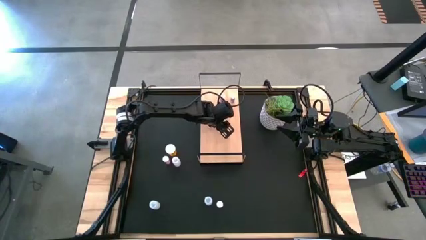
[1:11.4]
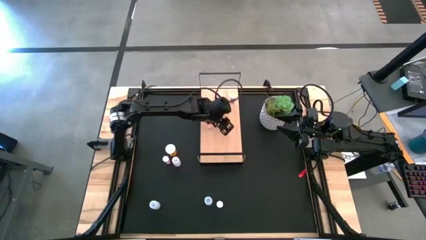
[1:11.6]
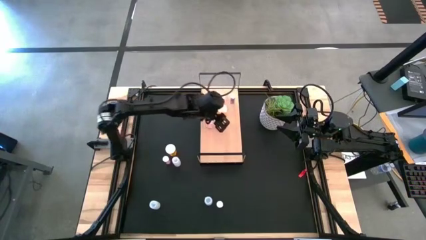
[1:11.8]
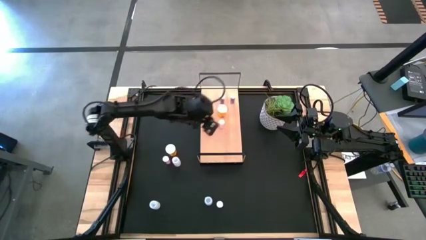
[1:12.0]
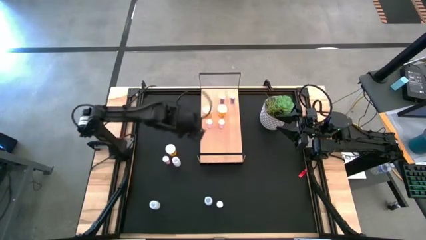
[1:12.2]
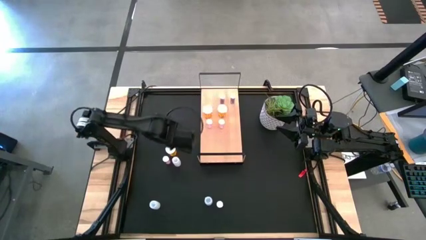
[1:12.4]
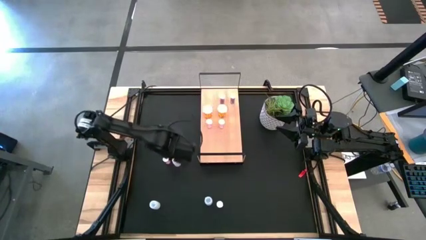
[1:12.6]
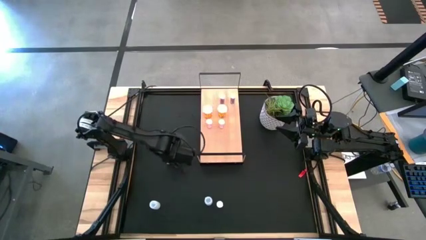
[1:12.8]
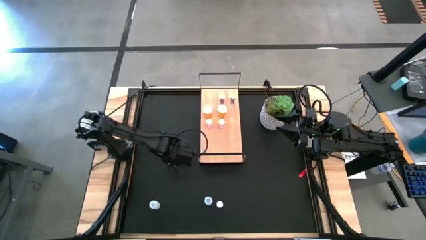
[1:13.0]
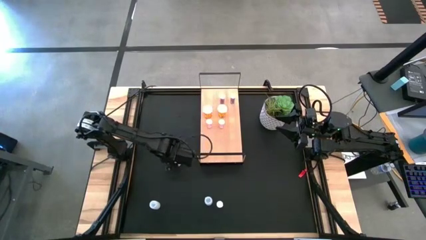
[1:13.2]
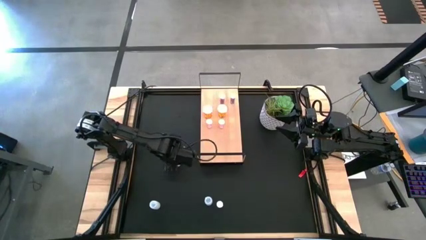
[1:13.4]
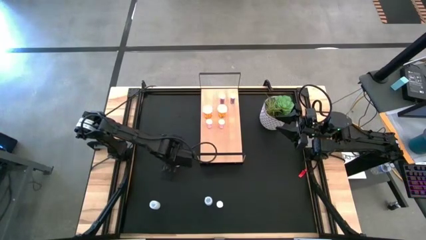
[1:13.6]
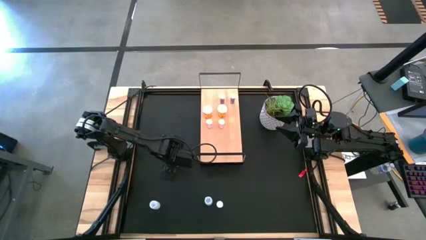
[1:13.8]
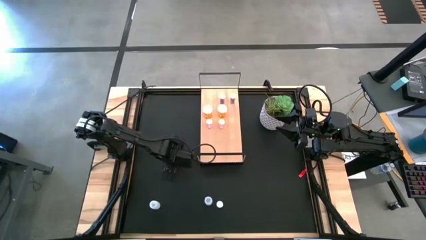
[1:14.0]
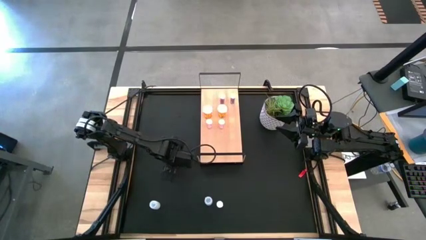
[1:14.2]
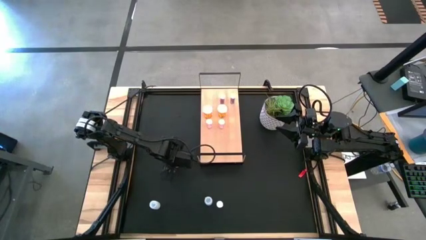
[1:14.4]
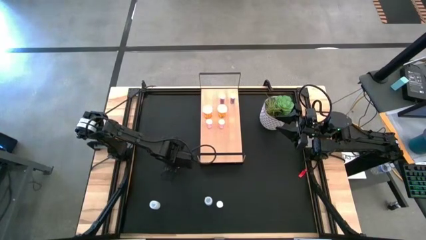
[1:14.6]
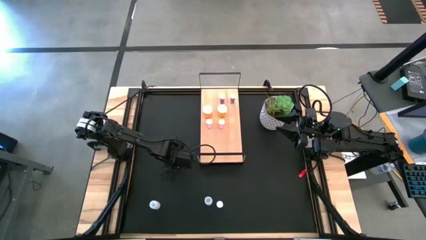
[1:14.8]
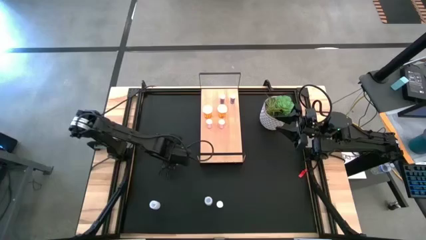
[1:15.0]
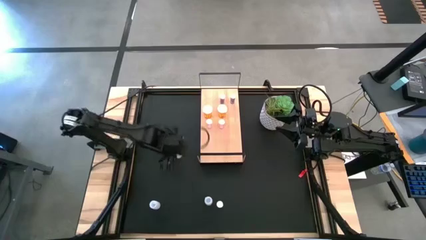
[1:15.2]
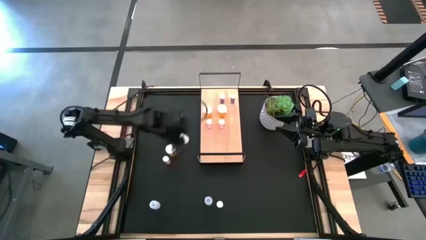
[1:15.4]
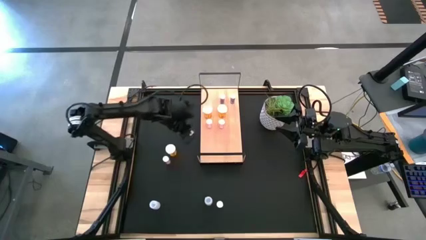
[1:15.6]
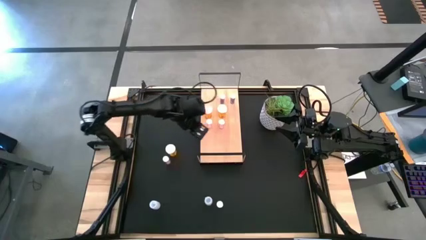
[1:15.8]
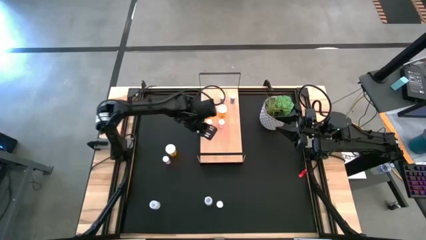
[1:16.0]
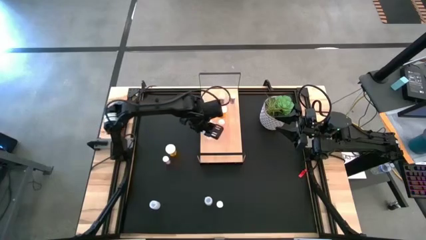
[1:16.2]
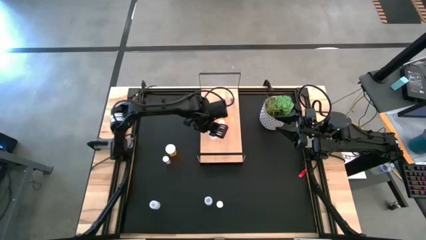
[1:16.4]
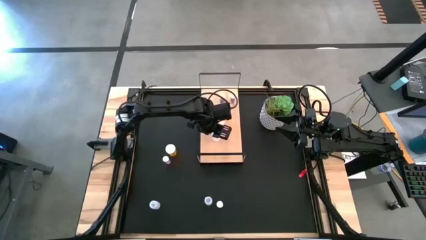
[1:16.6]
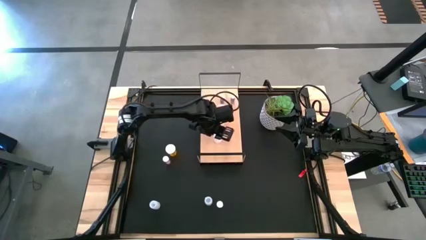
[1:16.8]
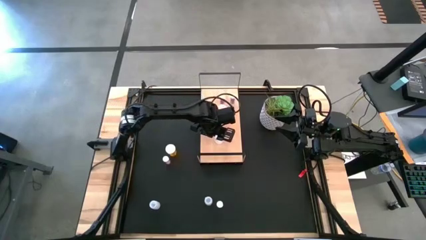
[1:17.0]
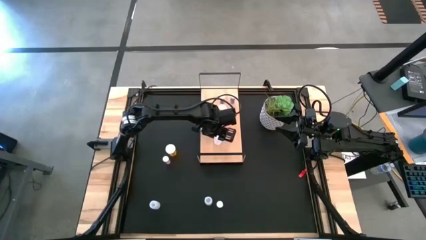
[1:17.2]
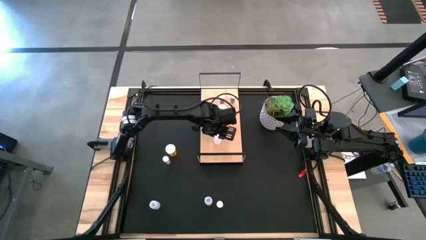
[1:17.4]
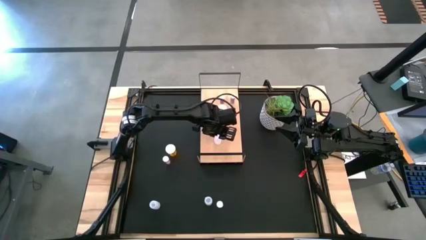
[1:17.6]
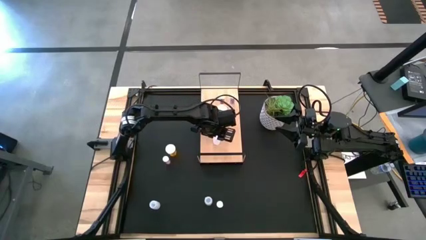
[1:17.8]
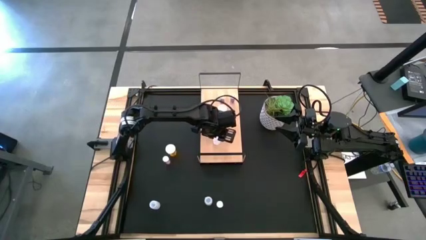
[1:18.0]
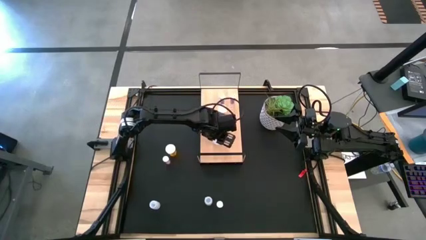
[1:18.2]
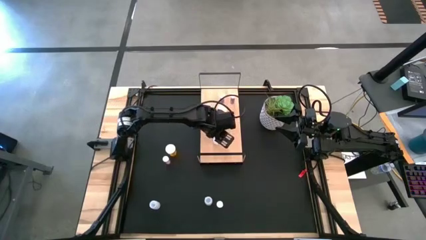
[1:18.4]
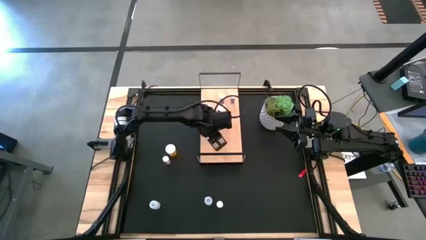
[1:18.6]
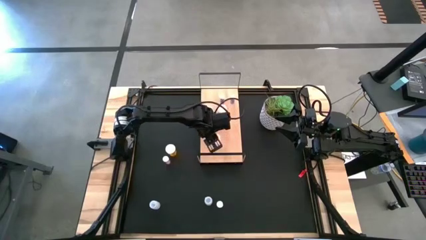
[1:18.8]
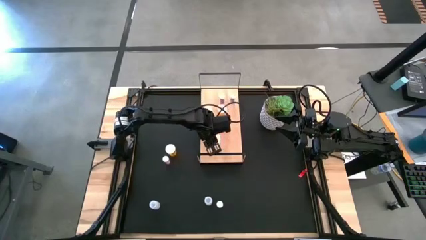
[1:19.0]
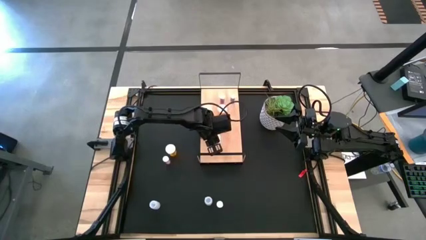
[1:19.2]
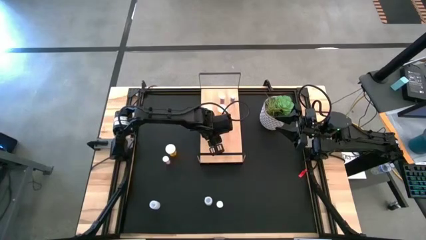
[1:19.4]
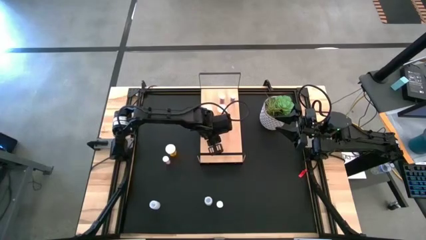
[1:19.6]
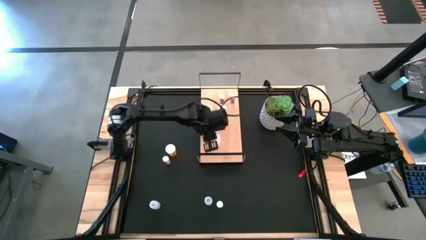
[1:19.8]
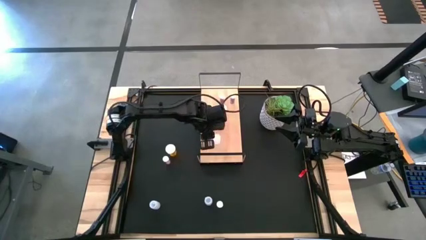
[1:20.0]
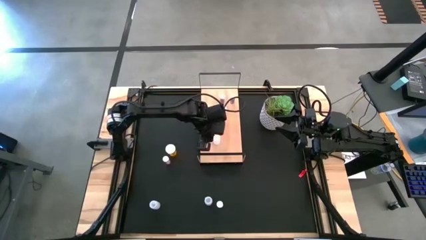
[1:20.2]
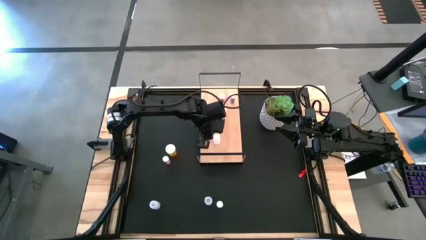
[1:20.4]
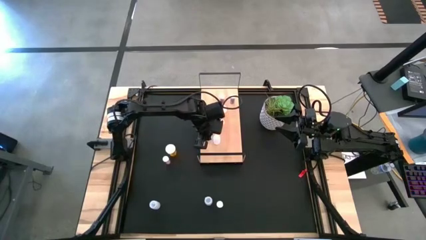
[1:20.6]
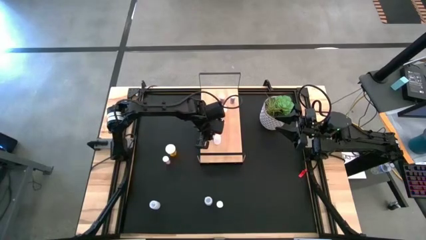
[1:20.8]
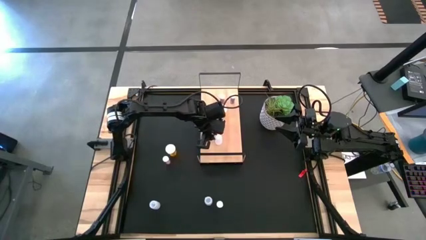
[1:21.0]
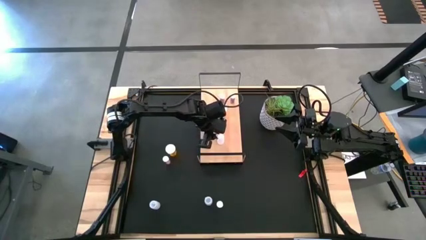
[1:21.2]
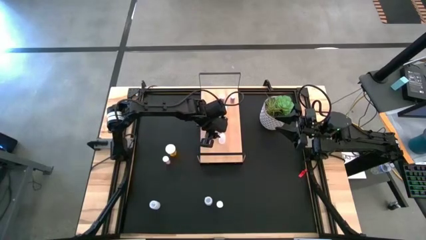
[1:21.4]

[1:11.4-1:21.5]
Task: Pick and place medicine bottles onto shelf by color
Put the white pill bottle on the shelf

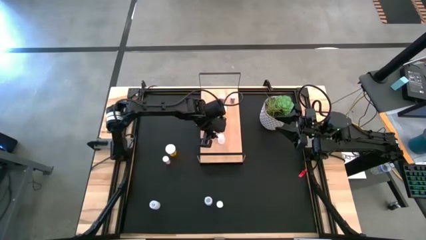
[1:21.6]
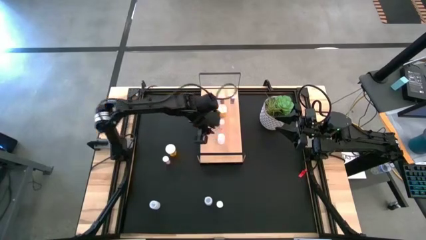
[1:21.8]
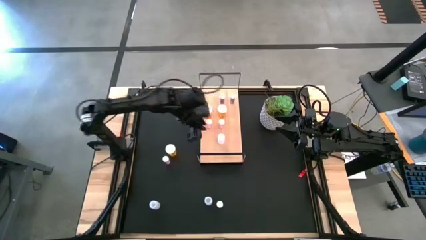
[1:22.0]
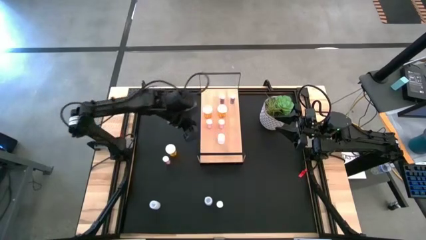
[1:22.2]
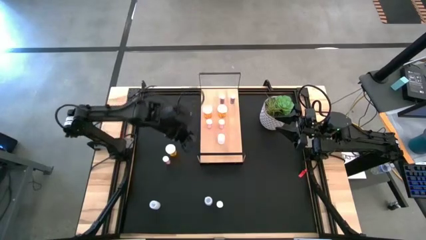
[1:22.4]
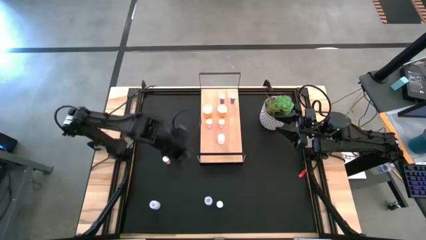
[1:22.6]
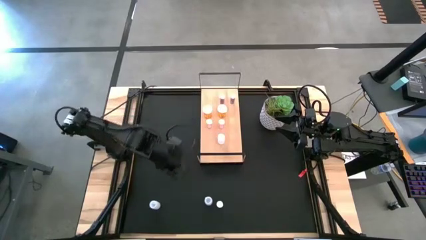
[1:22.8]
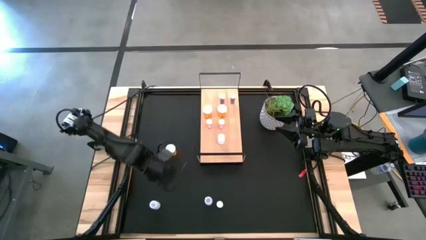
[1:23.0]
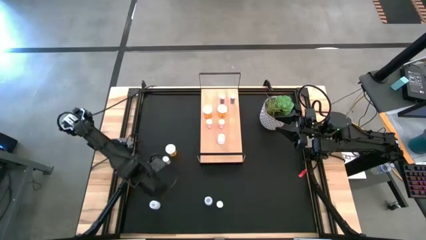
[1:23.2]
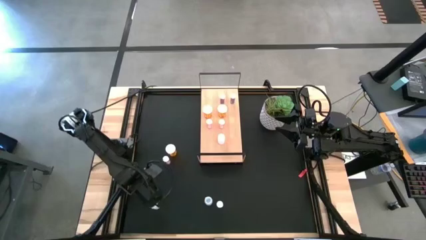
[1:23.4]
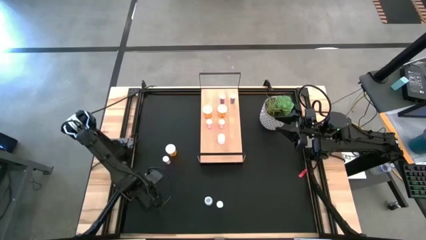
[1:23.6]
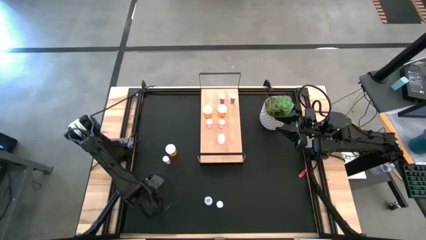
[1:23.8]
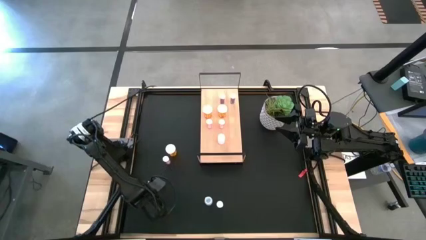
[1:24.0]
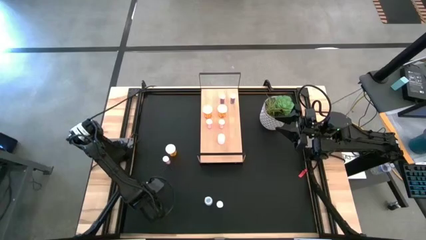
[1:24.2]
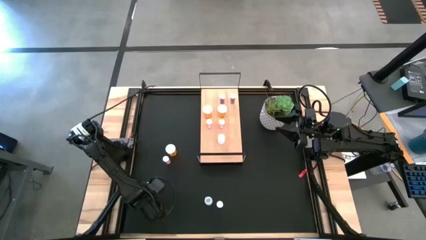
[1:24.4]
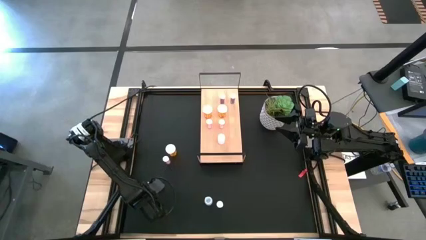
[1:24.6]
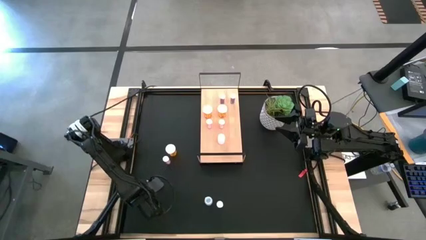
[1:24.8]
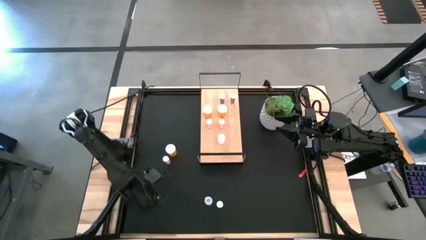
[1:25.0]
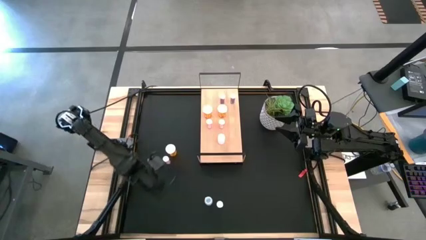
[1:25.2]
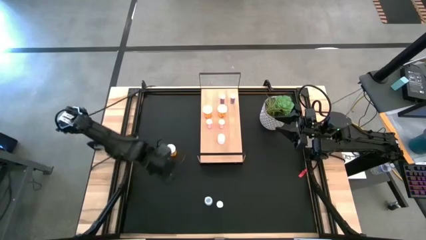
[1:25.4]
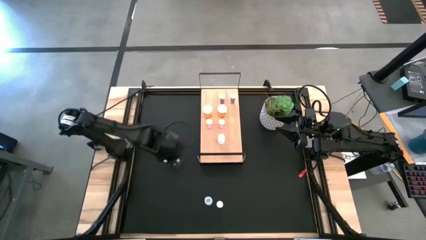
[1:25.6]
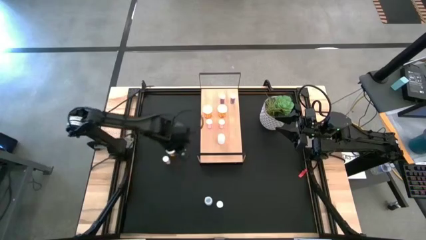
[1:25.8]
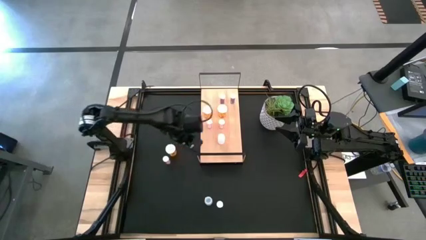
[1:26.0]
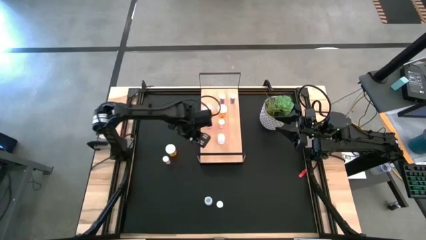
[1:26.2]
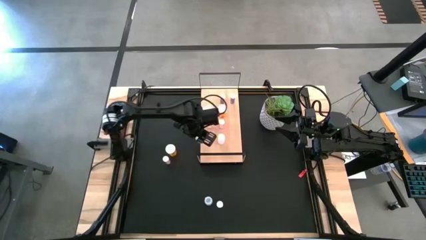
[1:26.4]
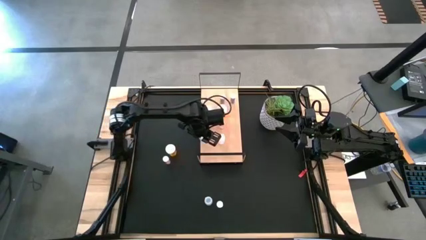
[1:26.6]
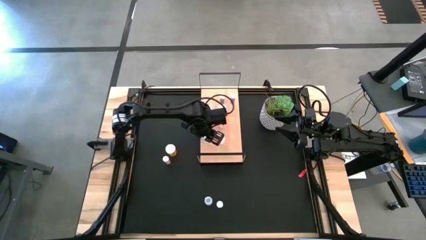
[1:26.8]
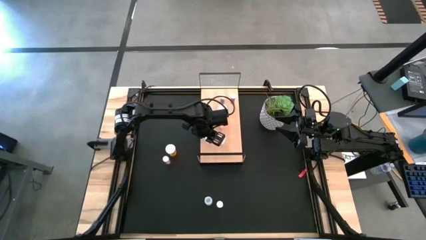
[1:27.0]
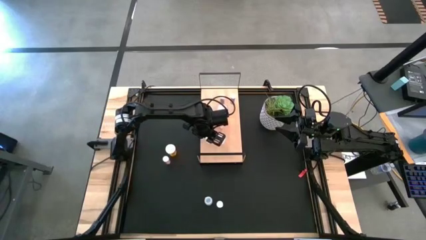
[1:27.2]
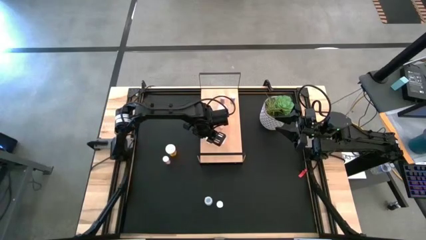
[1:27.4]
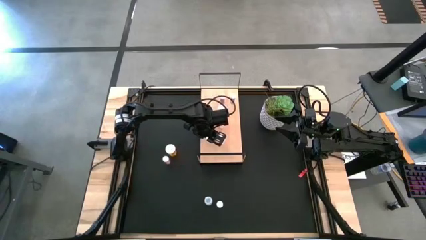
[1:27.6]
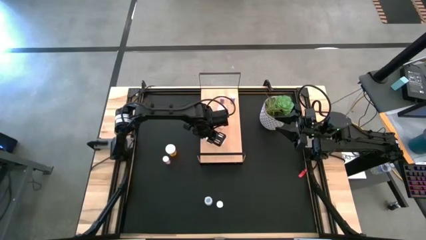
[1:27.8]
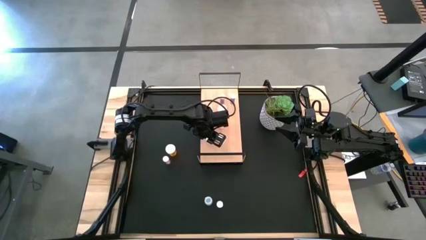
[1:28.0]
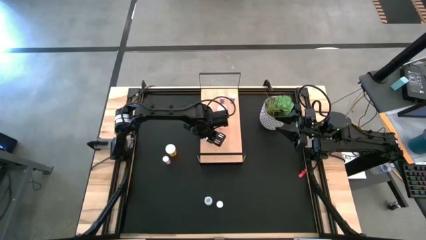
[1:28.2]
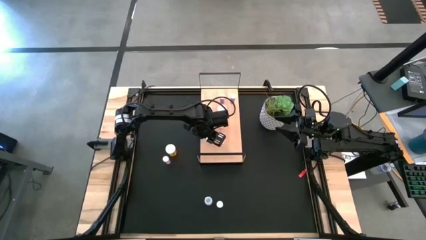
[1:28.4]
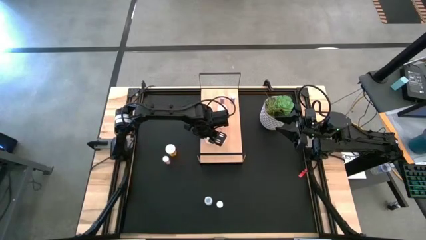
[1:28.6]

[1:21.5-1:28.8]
Put the left white pill bottle on the shelf aligned with the white pill bottle
